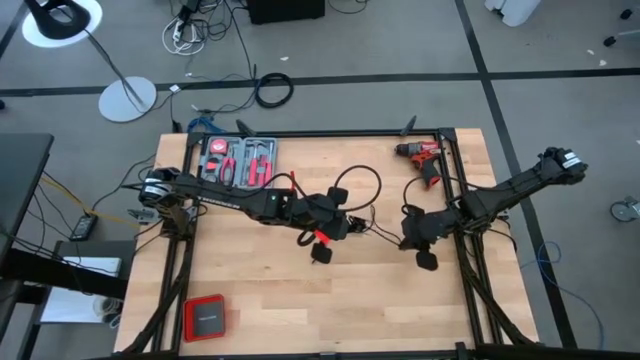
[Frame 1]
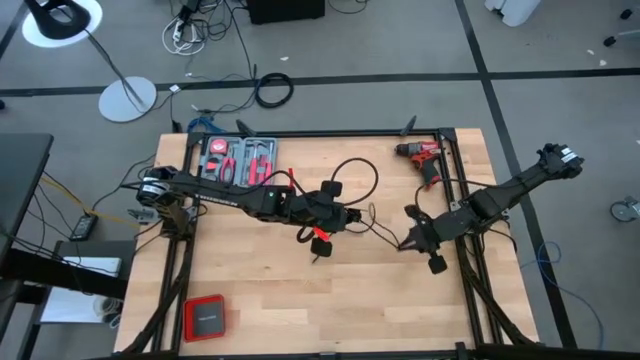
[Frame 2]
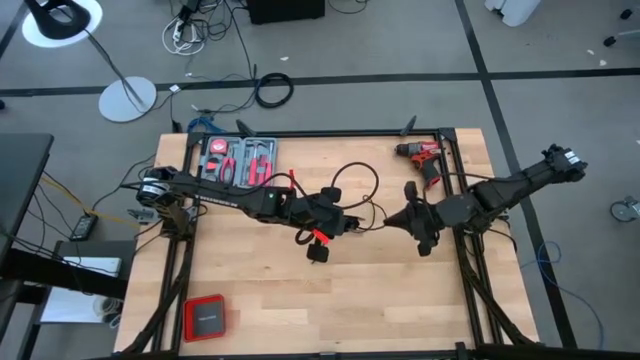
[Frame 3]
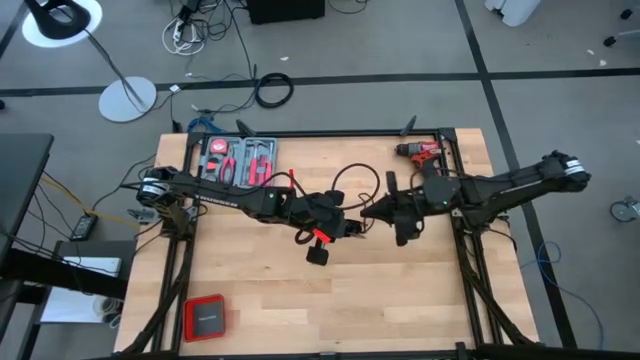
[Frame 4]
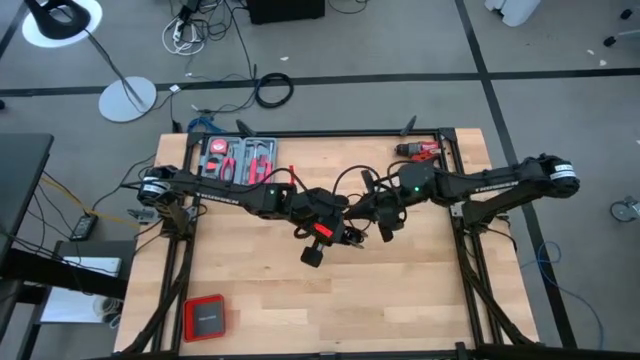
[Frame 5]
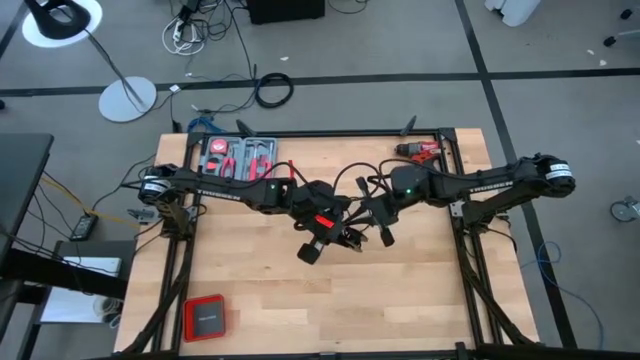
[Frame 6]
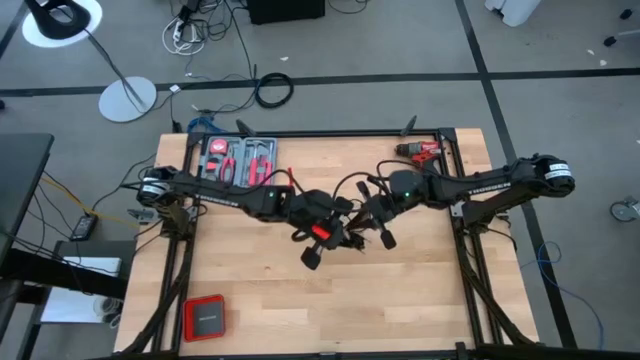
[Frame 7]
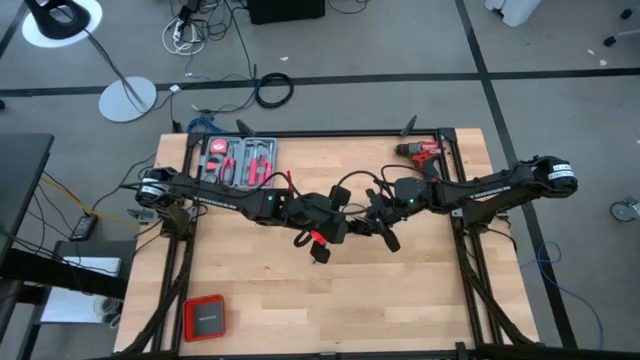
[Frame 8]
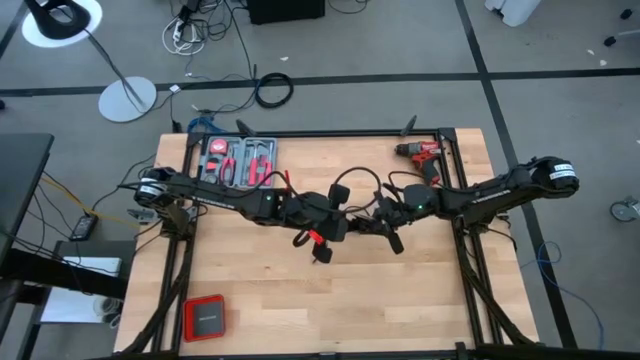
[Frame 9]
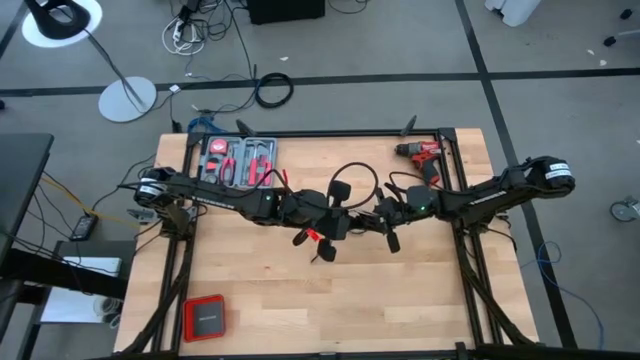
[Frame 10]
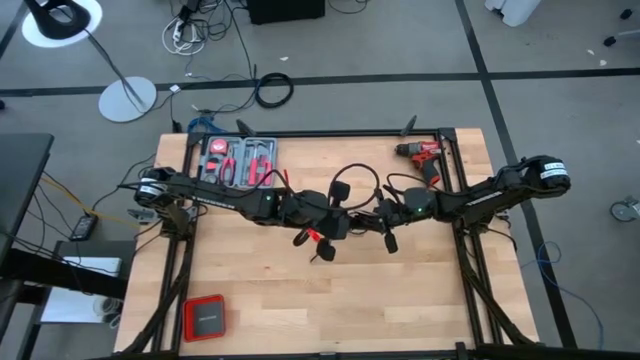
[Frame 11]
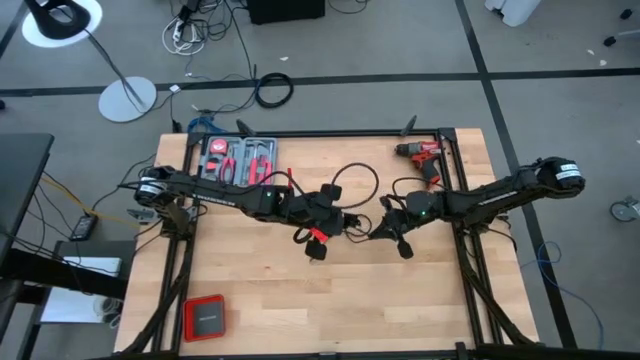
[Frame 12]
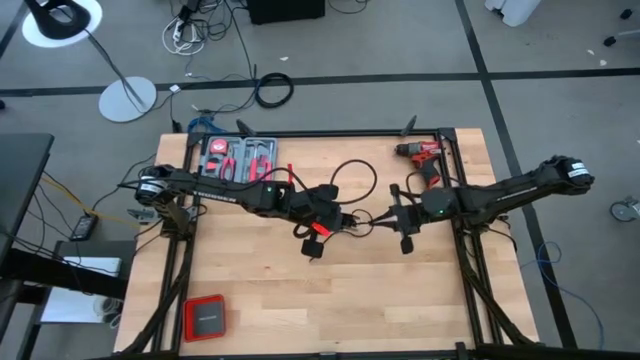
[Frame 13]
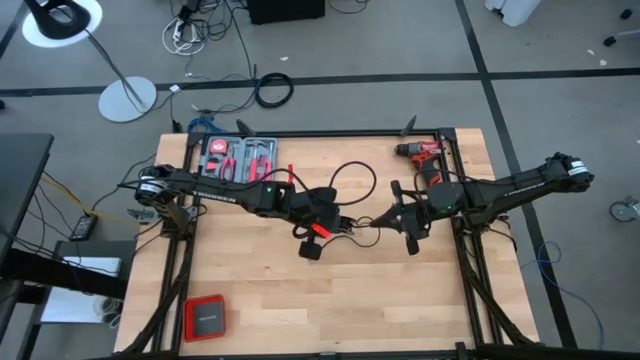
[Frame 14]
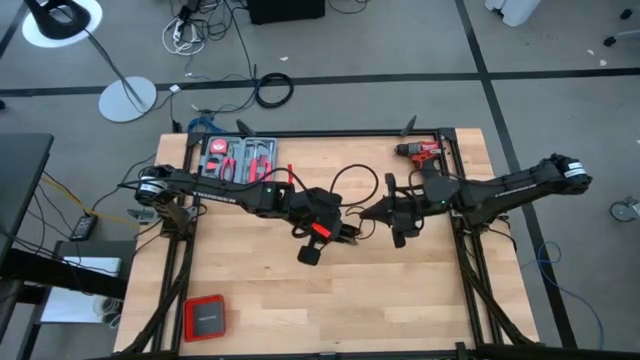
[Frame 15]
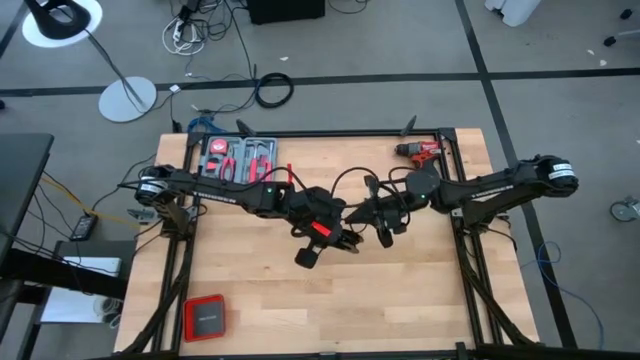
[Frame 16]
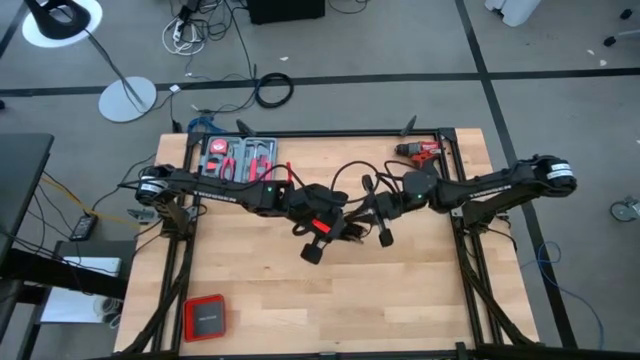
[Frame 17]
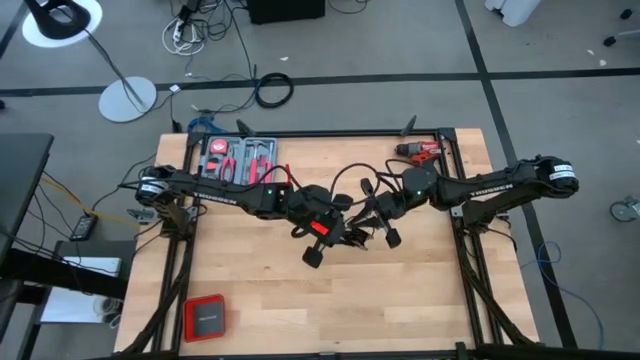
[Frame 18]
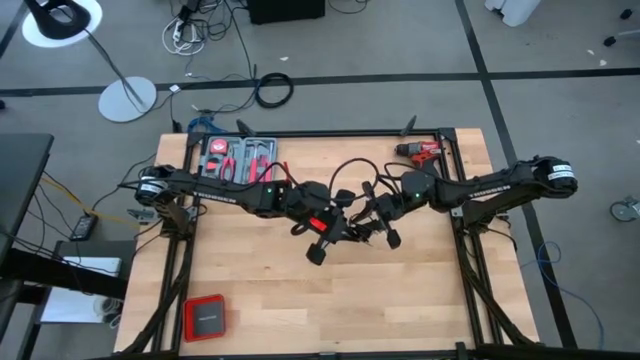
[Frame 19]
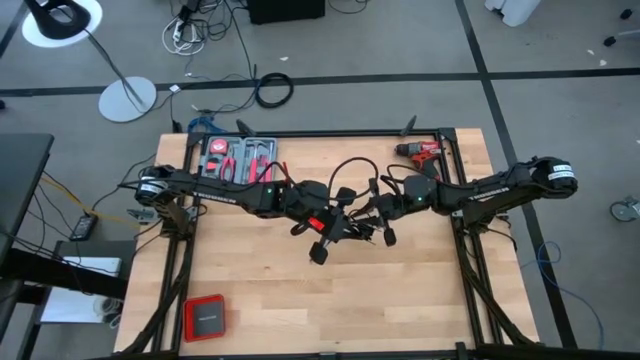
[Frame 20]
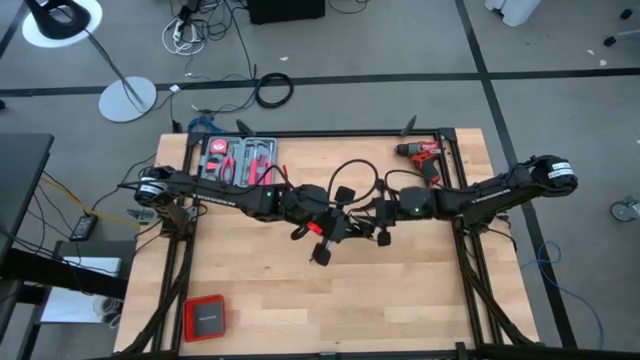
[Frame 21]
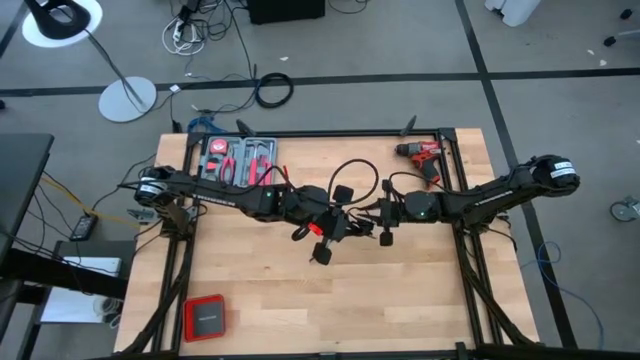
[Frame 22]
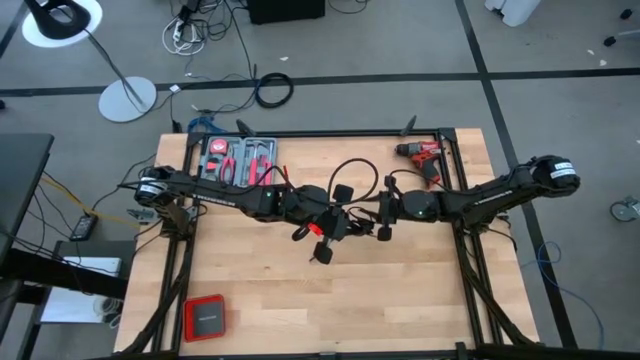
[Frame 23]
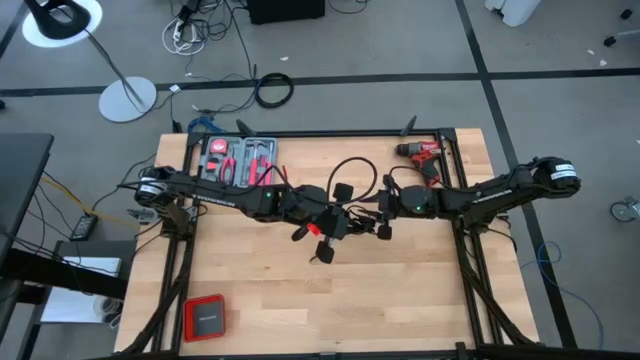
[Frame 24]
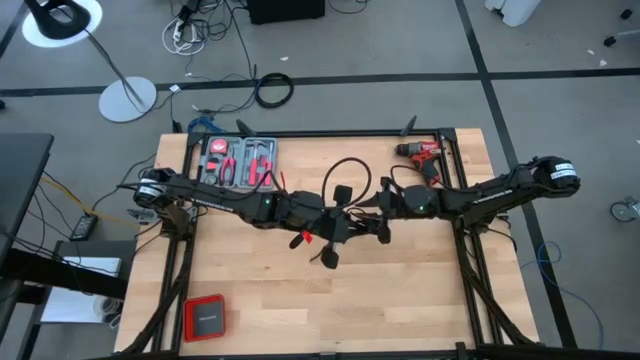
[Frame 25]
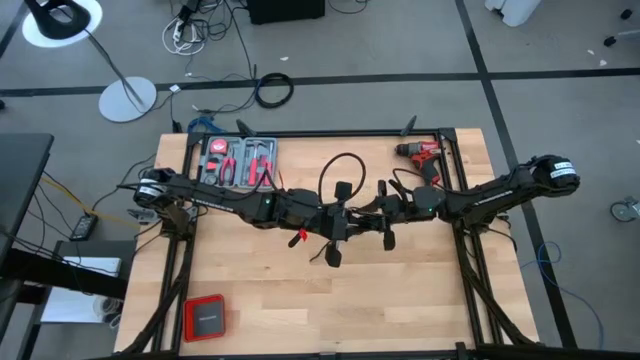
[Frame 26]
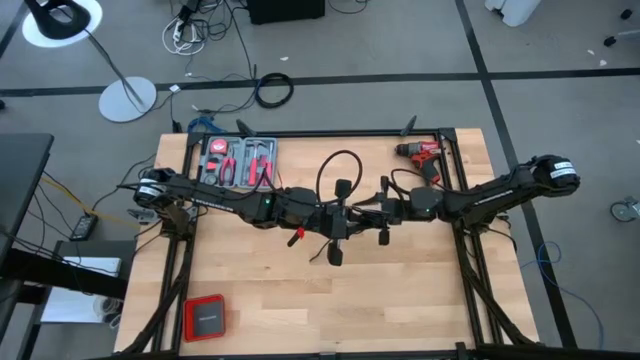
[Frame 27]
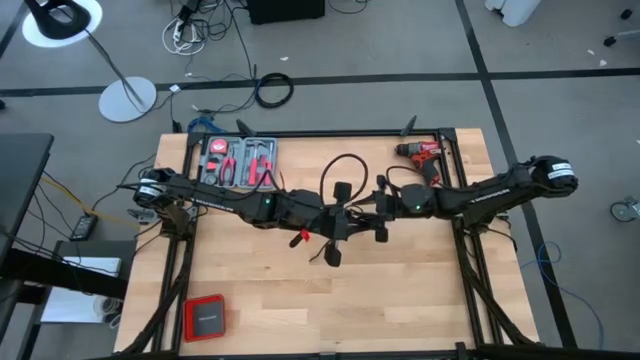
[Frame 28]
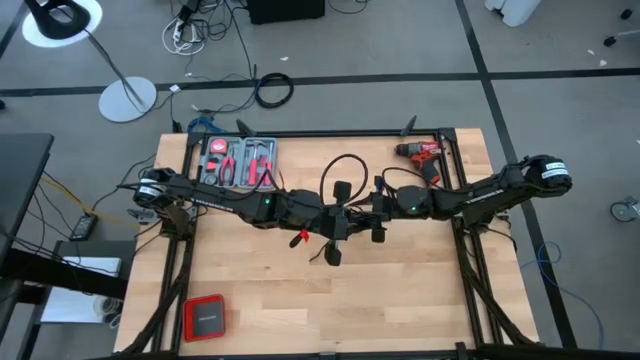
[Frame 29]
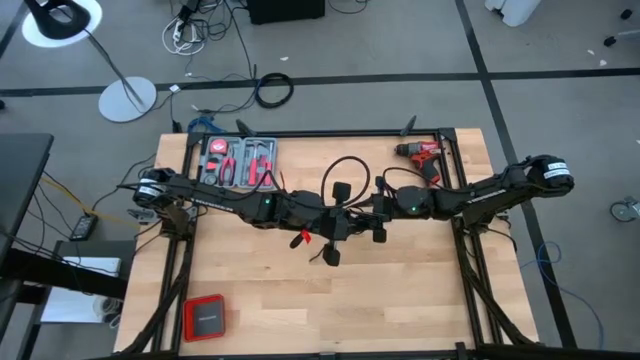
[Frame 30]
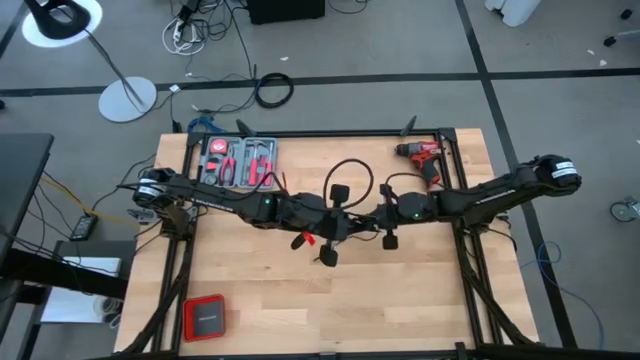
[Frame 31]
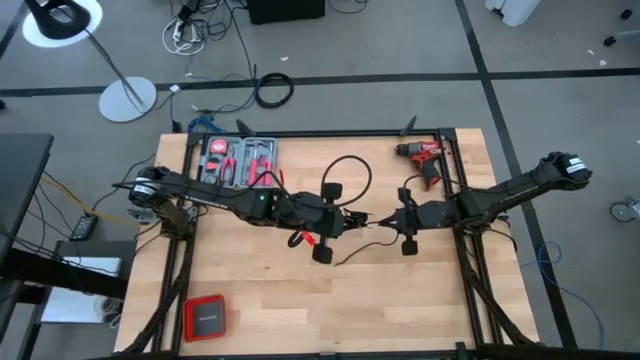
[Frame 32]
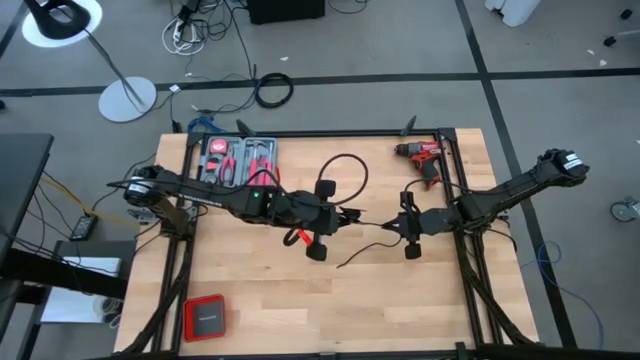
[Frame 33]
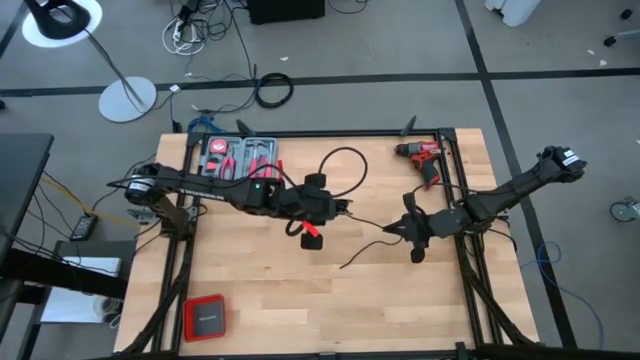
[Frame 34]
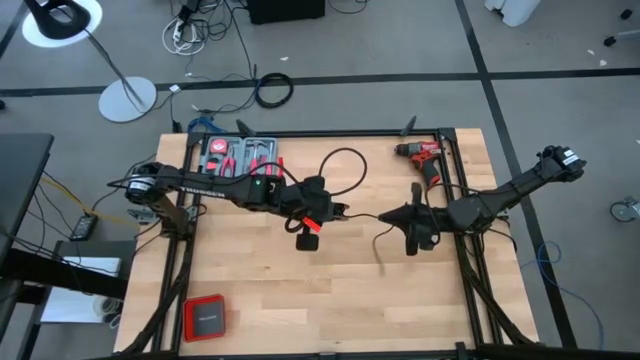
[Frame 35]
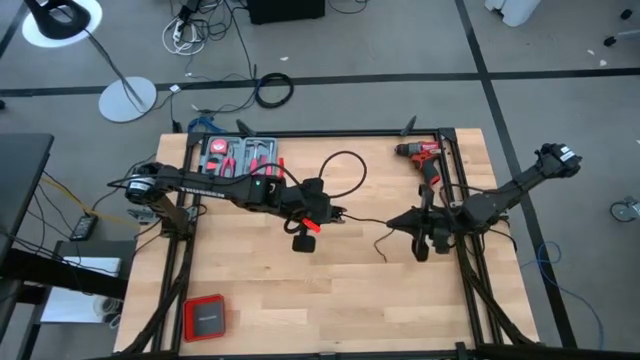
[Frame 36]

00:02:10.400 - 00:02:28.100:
Task: Coil cords
Coil the black wire on the spool

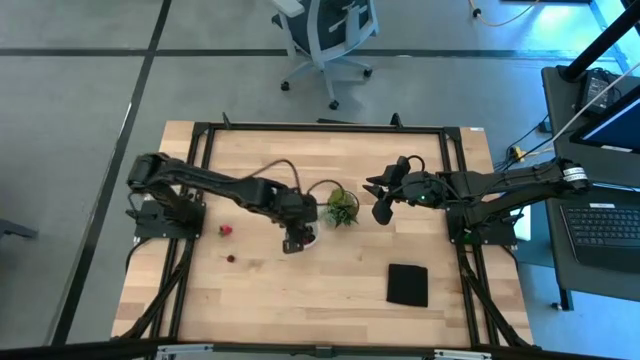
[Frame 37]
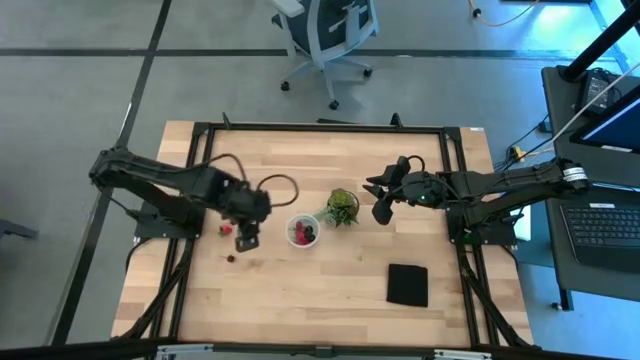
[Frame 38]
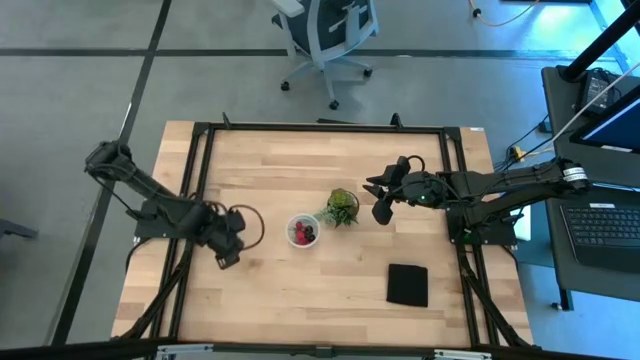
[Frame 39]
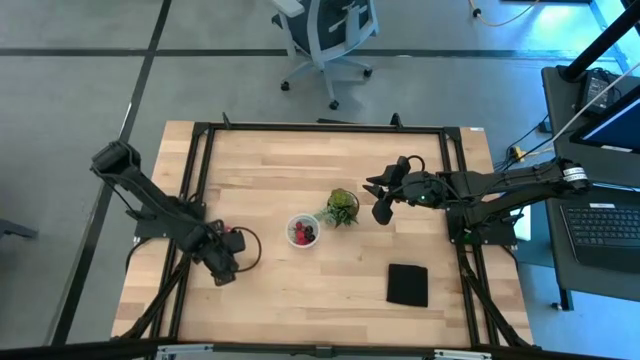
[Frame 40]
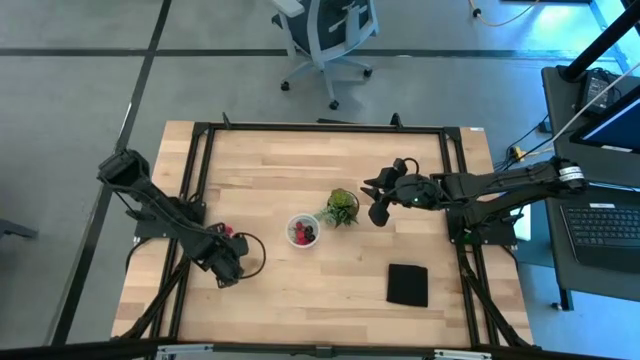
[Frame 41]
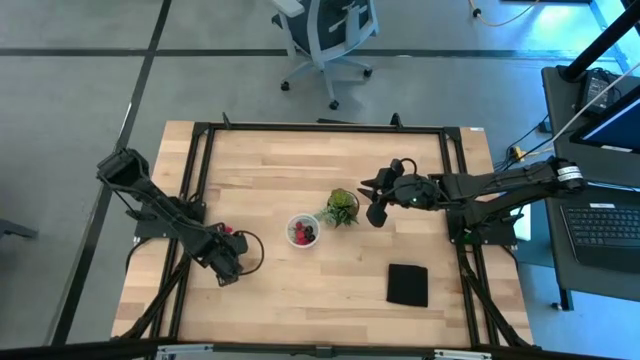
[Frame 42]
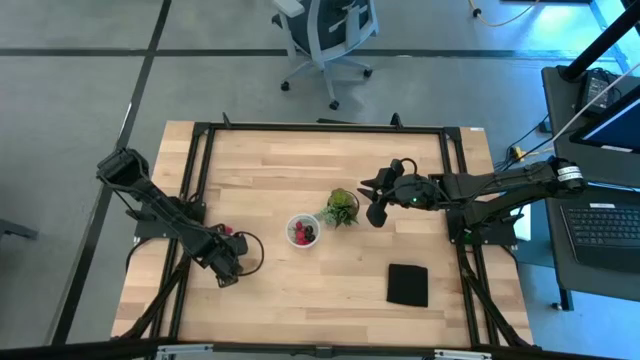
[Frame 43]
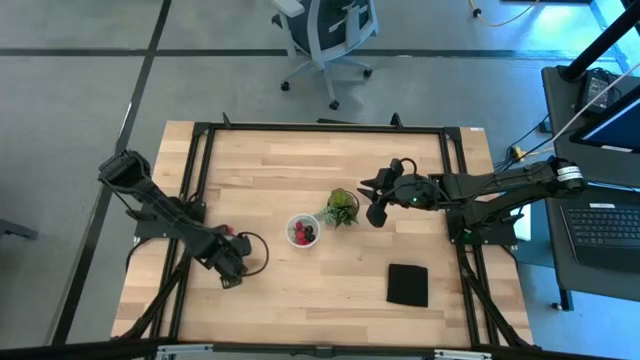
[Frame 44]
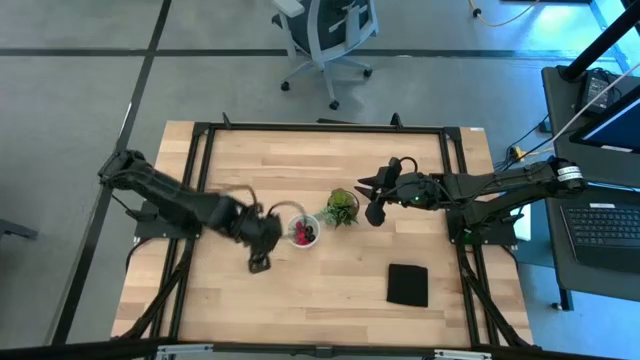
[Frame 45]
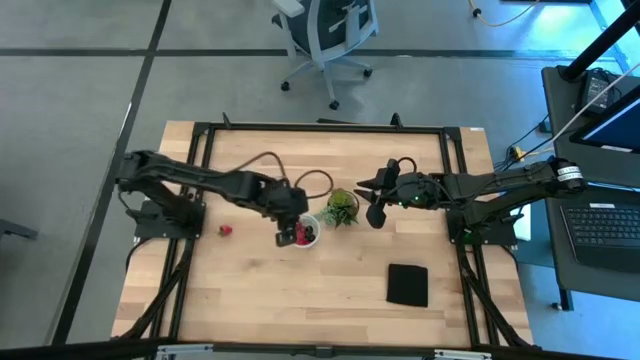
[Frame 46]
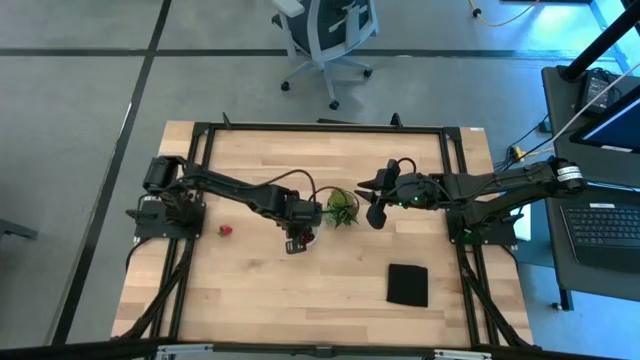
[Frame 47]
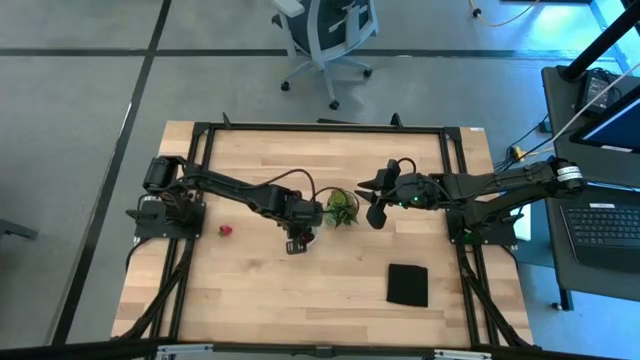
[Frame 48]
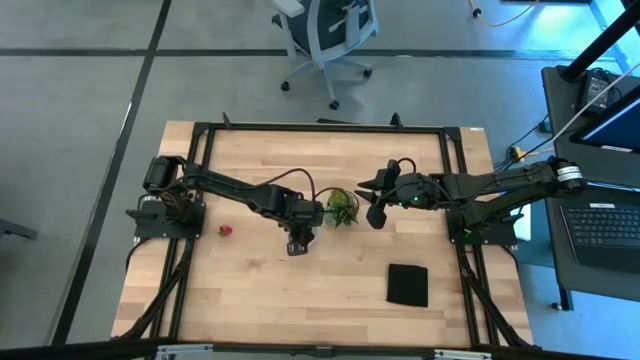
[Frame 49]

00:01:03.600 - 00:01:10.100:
Task: Pick and placing Produce into tupperware
Put the red cherry into the transparent container
